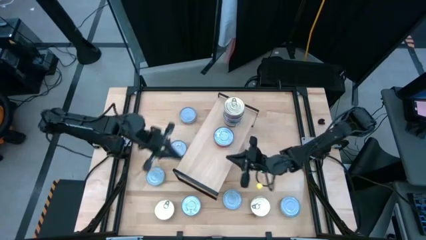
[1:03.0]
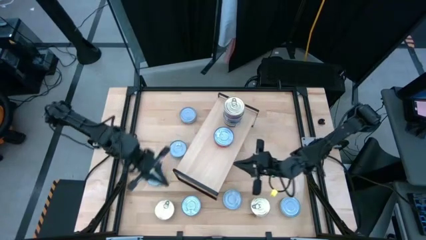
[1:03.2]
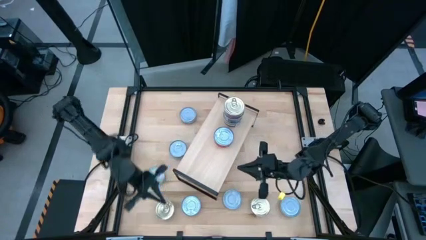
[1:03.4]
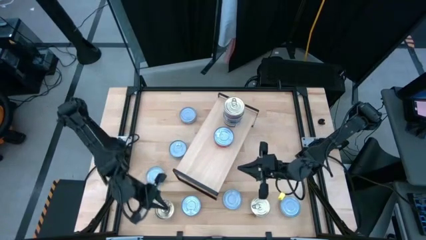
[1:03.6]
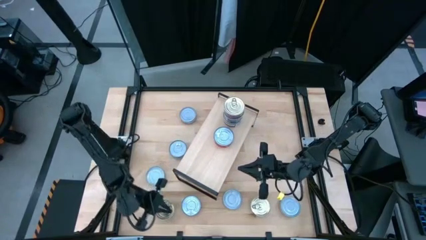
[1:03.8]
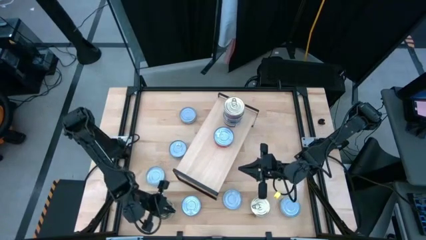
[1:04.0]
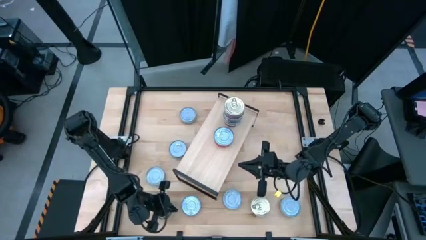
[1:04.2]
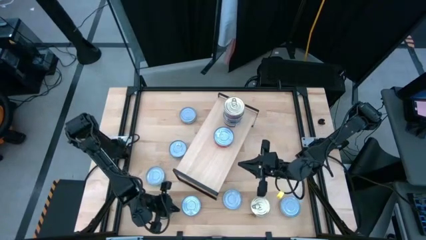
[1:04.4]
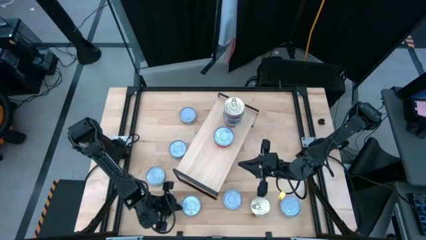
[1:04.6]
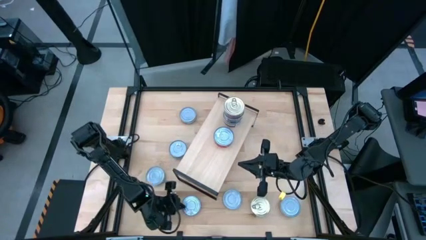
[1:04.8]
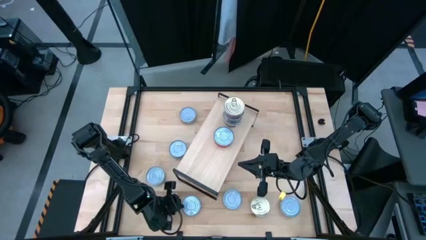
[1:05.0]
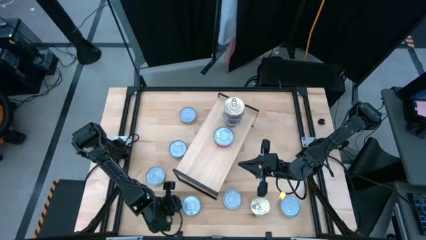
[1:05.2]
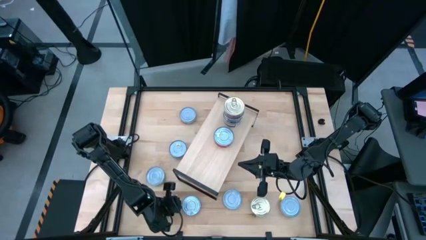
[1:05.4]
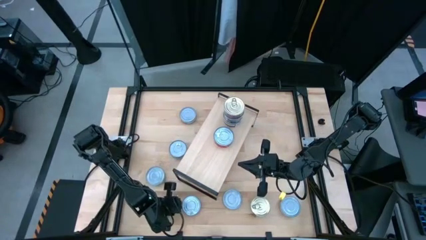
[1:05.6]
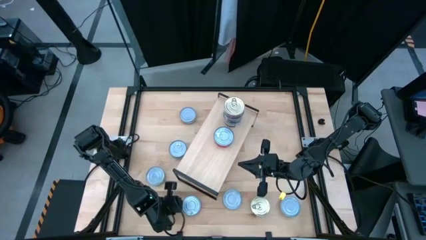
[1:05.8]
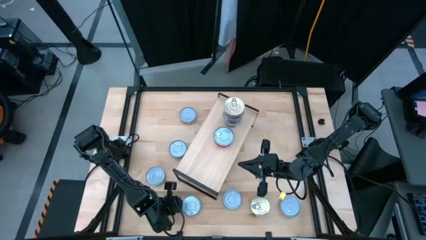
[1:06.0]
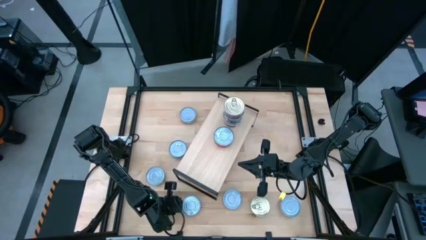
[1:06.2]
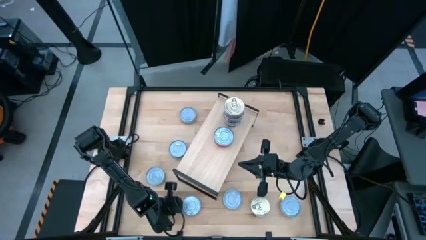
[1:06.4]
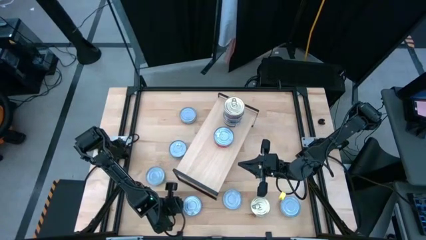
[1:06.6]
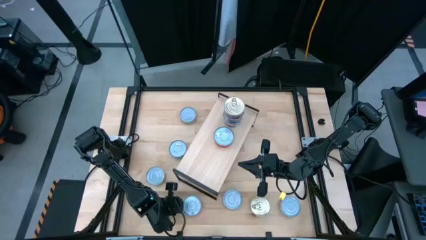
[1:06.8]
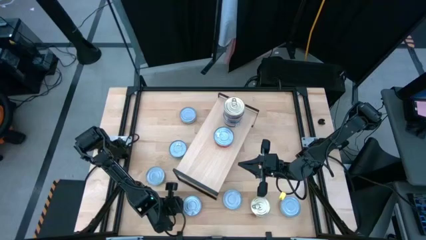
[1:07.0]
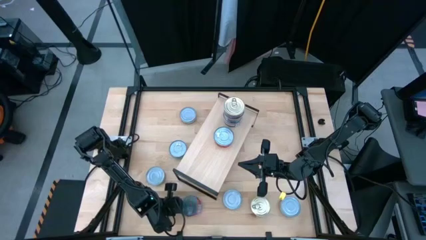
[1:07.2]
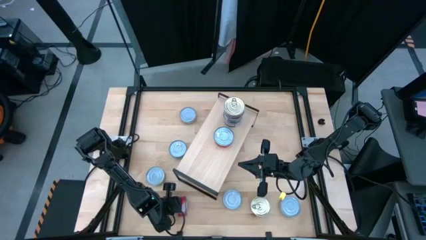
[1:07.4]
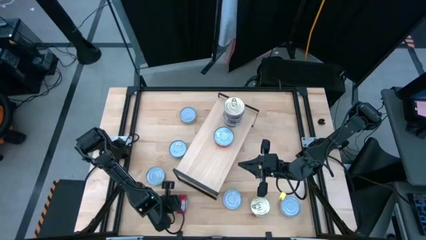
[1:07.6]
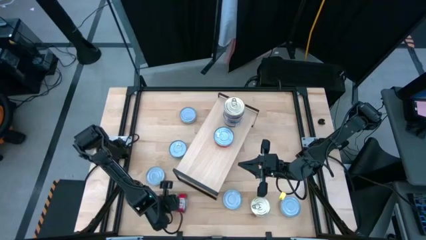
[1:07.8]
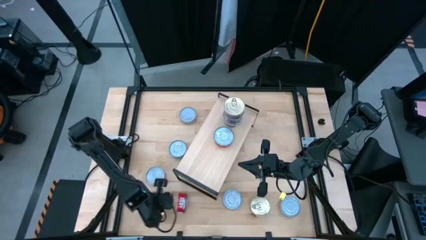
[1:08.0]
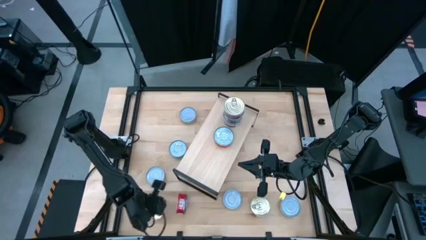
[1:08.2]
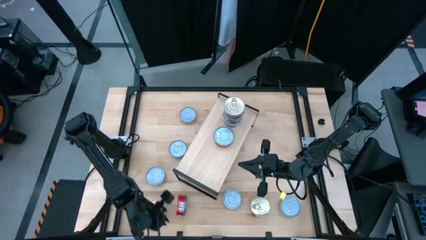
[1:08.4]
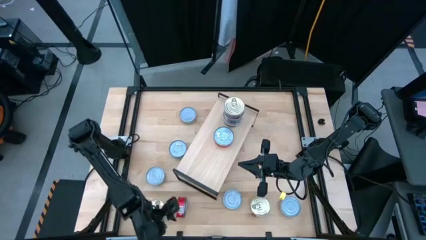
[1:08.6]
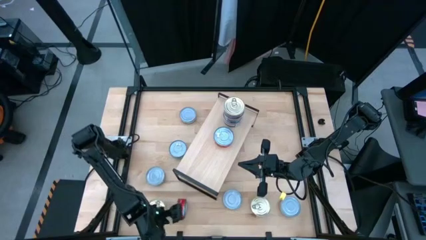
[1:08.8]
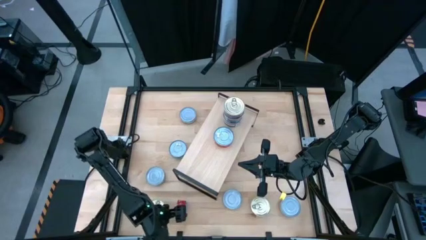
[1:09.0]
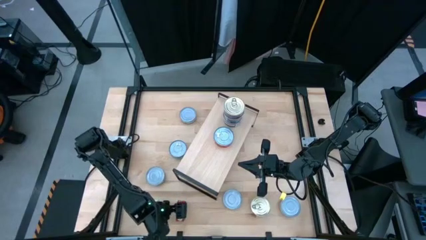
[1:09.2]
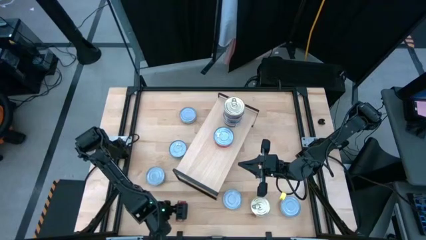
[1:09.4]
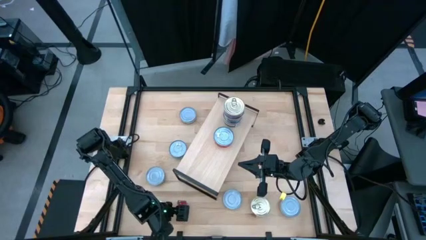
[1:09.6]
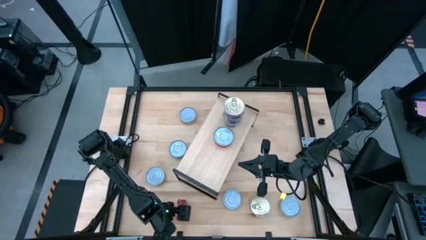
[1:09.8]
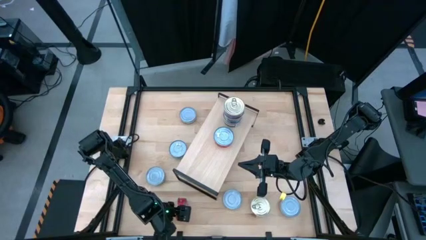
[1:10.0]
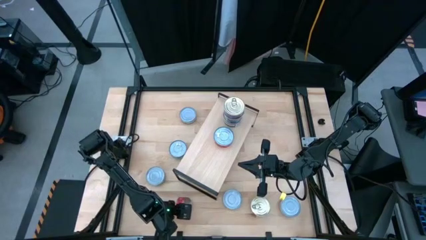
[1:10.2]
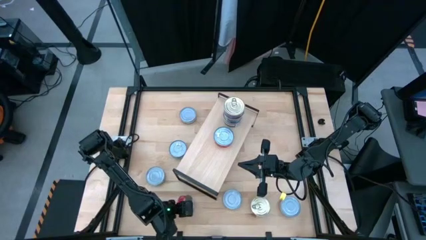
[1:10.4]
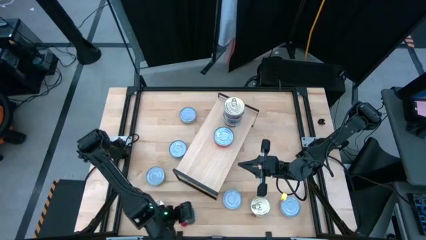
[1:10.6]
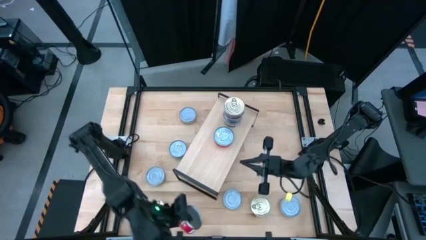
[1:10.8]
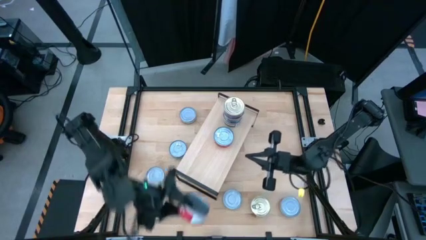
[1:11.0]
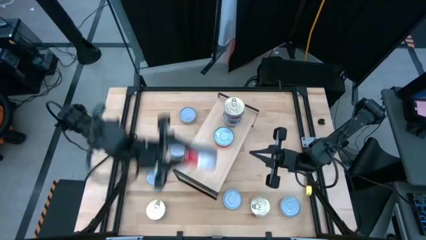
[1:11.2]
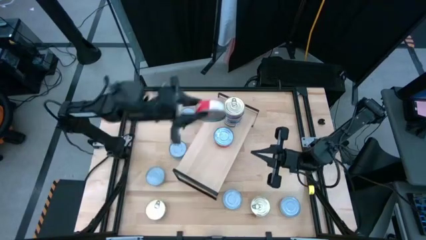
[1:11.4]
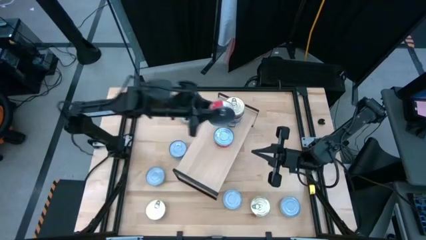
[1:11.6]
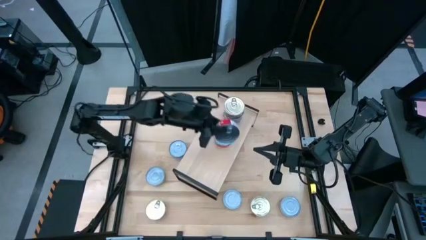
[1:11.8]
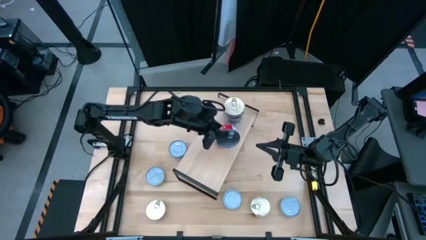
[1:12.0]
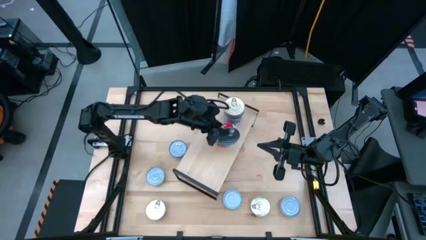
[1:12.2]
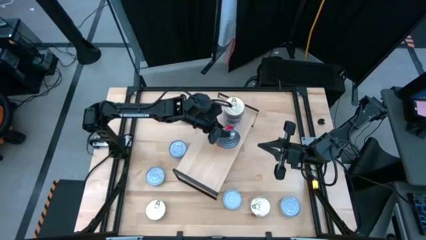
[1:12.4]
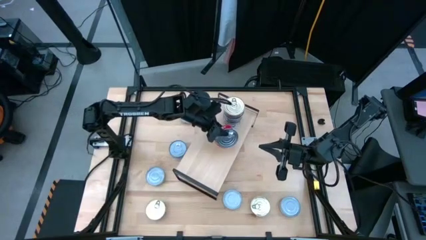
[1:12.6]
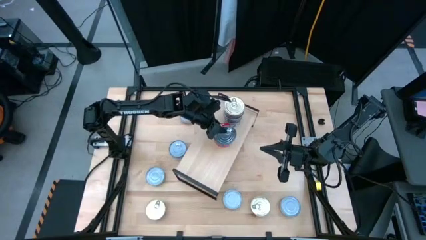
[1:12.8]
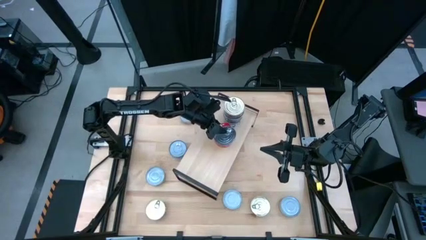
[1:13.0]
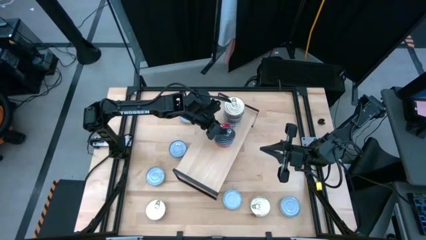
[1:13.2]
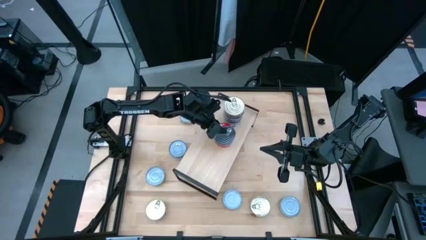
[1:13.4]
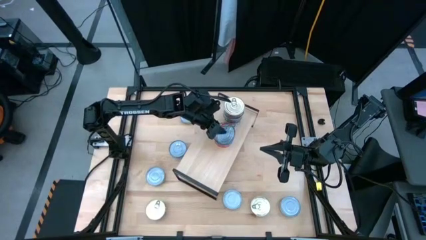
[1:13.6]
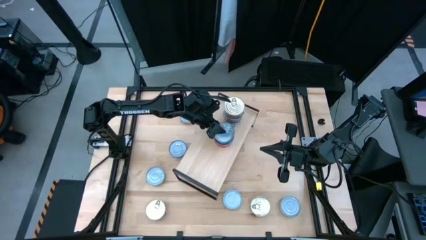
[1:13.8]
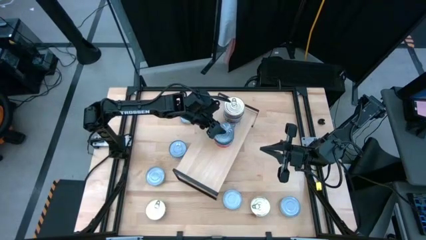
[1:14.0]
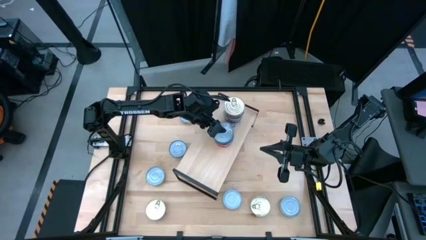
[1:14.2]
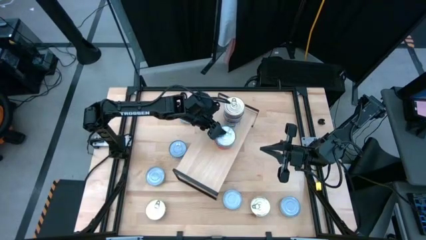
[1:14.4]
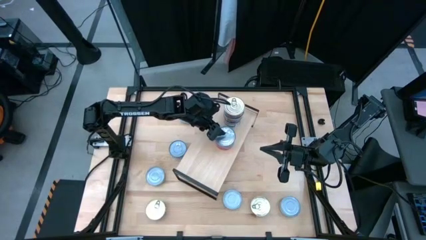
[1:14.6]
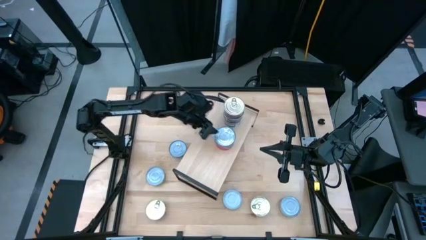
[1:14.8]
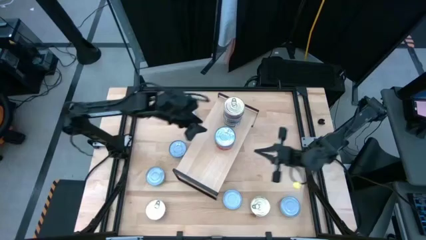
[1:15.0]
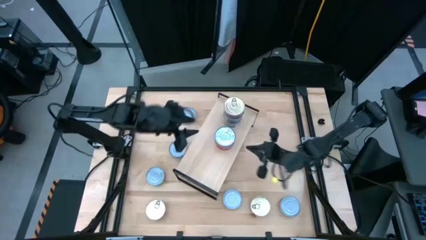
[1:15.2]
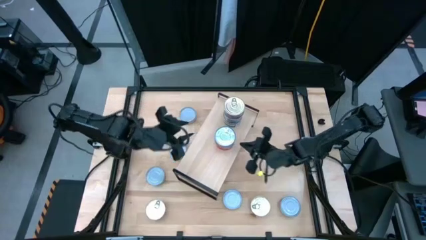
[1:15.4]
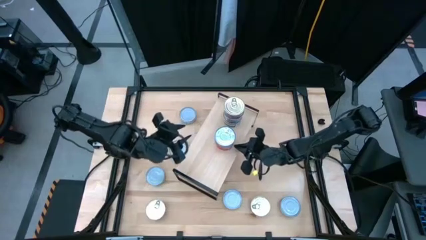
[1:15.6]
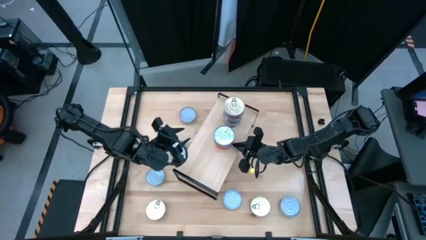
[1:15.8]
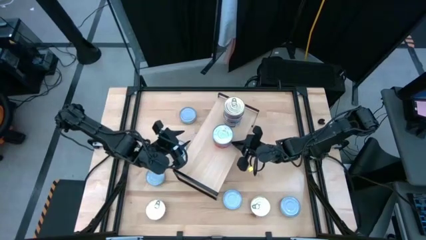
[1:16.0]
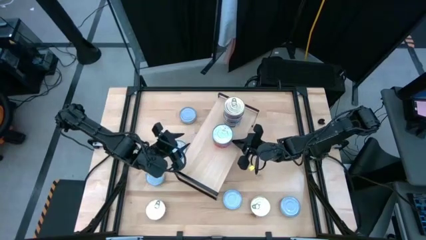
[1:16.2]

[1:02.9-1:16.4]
Task: Stack canned seafood by type on shelf
Stack the red tuna can on top of the red tuna can on the shelf

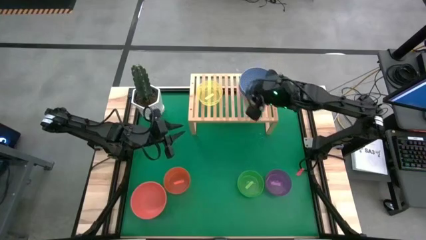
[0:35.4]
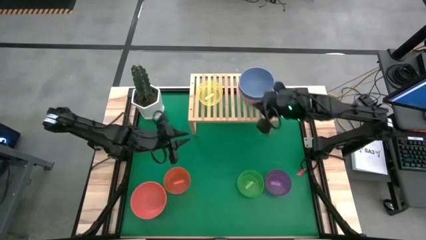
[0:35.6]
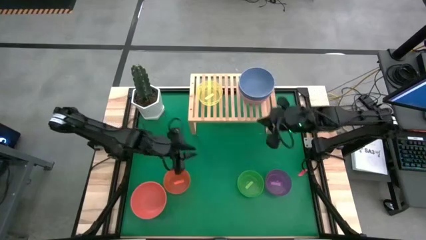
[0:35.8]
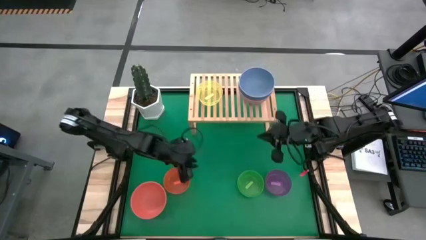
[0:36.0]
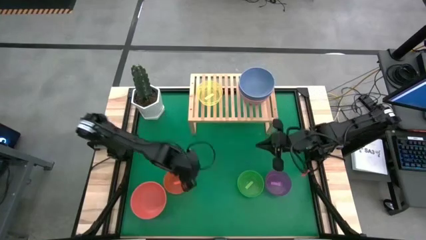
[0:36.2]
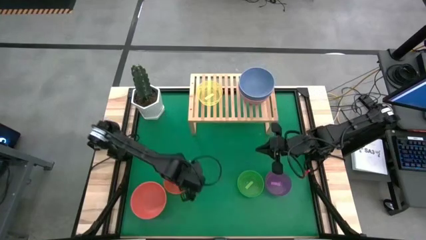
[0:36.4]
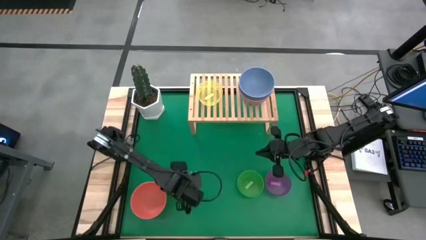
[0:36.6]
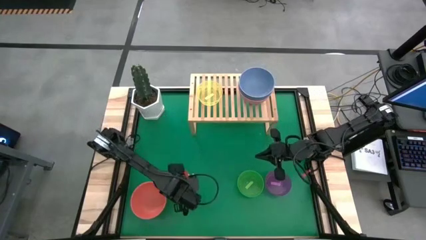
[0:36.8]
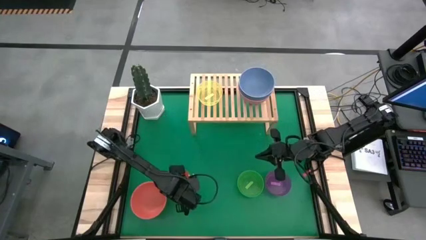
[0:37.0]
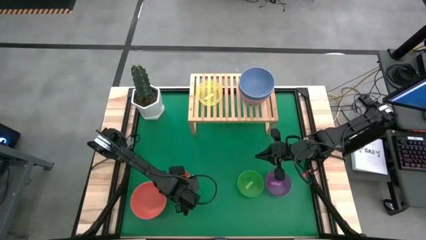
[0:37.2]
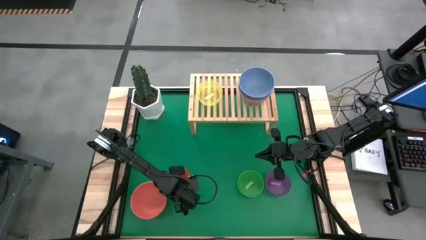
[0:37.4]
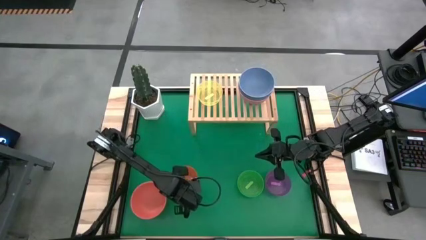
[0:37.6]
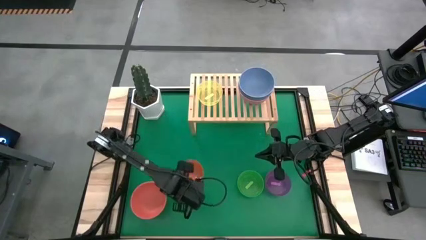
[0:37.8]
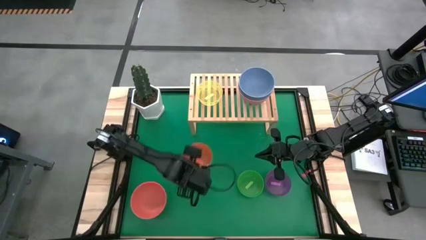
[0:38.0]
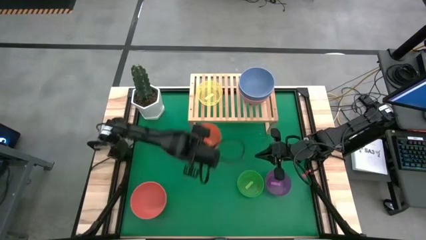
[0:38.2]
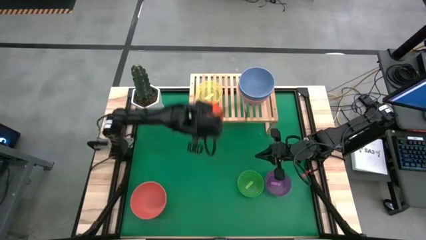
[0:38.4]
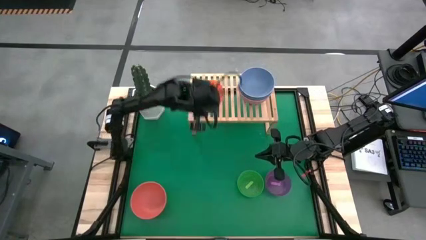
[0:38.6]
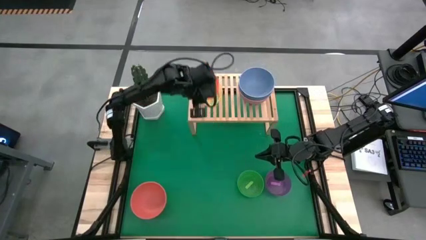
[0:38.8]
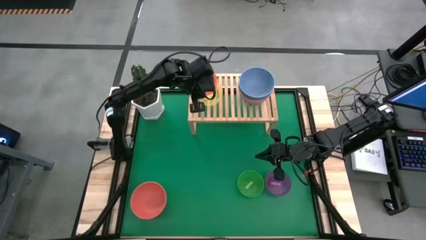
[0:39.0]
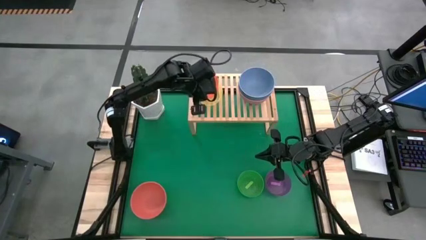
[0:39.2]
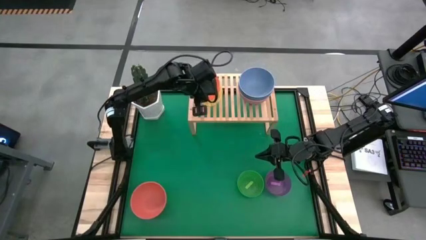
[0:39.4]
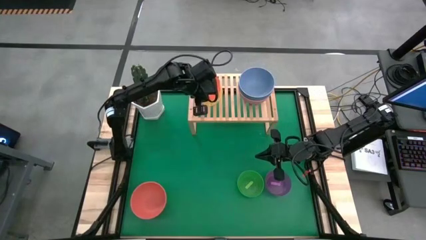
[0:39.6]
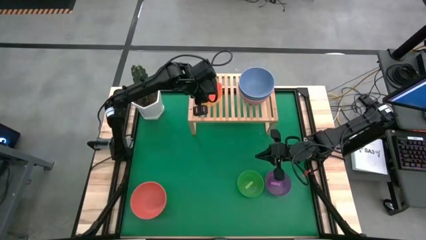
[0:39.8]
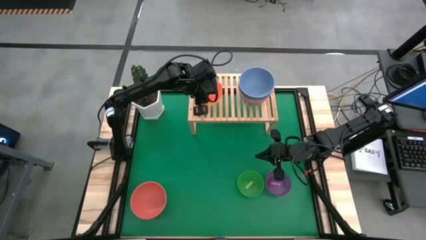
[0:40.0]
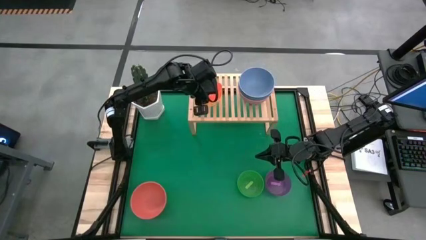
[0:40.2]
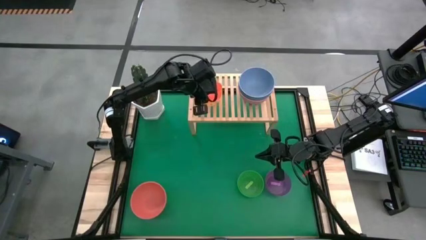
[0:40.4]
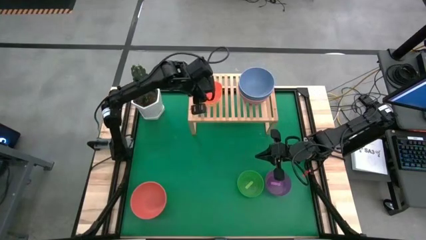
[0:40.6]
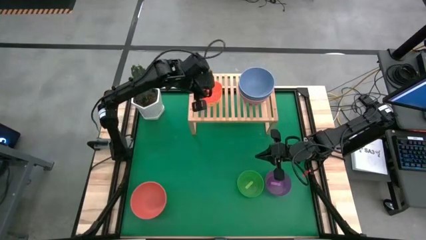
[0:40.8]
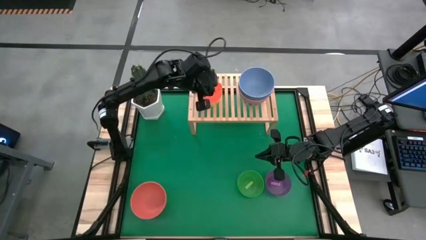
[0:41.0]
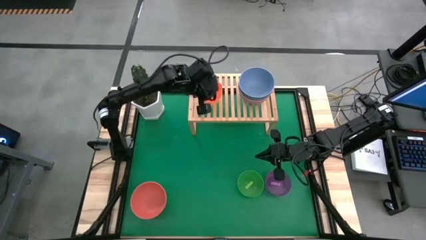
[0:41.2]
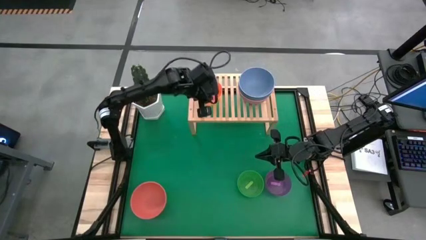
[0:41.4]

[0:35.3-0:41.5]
Task: Place and stack bowls onto a shelf
Stack the light orange bowl on top of the yellow bowl on the shelf
